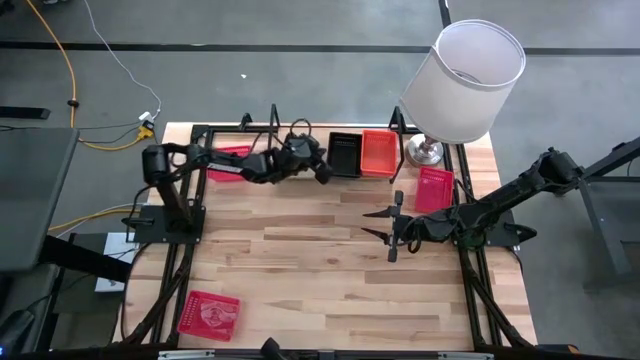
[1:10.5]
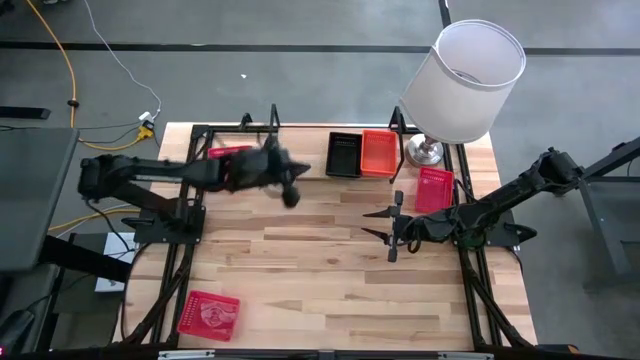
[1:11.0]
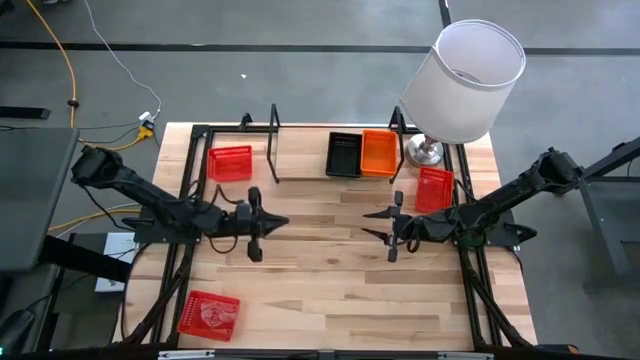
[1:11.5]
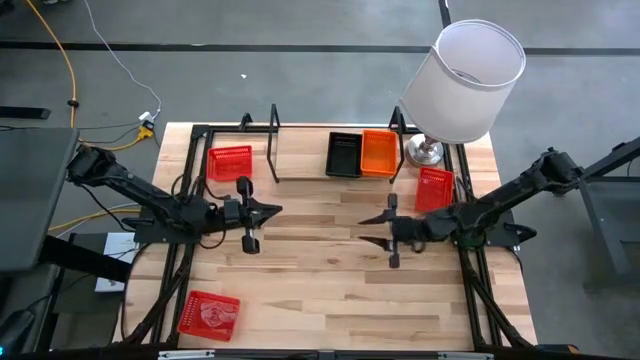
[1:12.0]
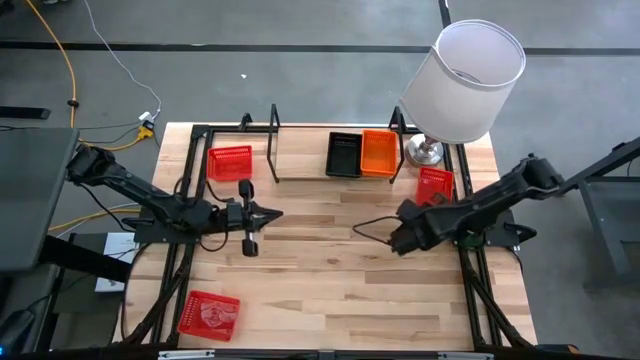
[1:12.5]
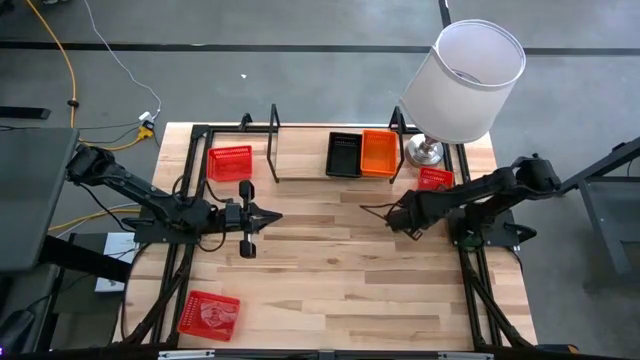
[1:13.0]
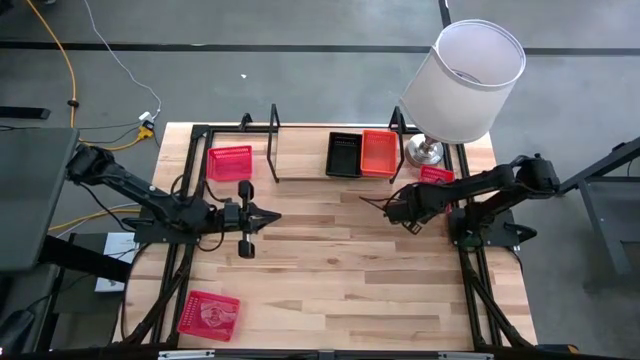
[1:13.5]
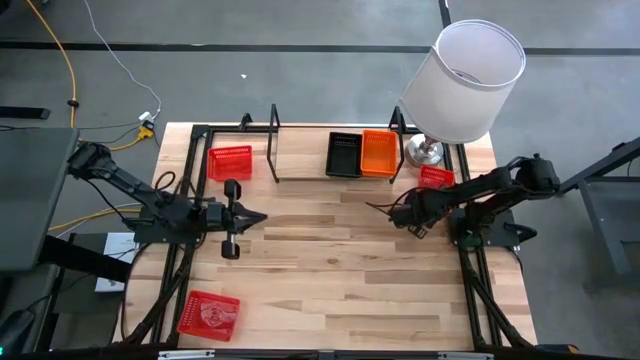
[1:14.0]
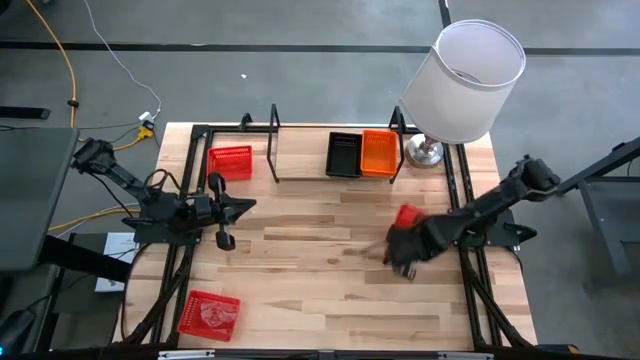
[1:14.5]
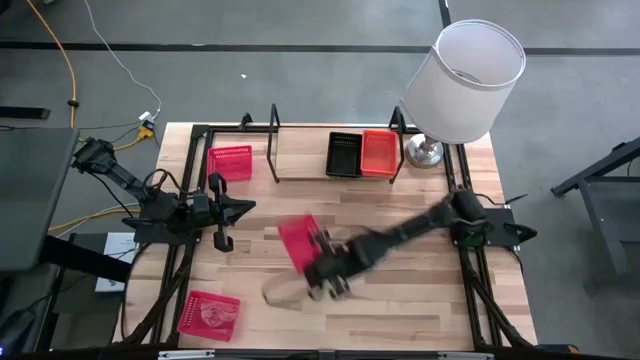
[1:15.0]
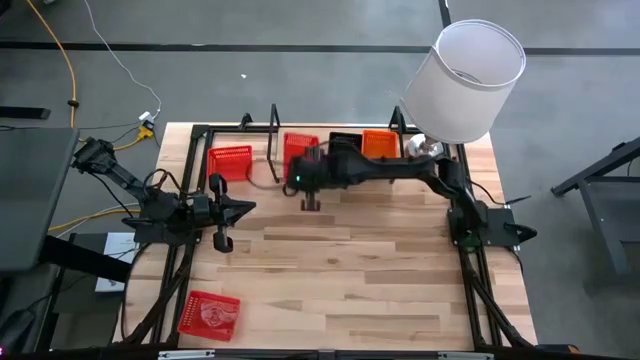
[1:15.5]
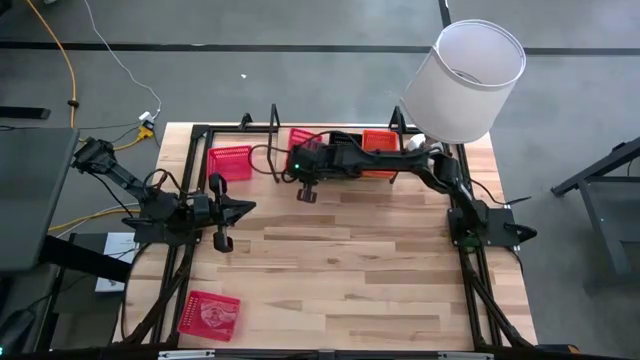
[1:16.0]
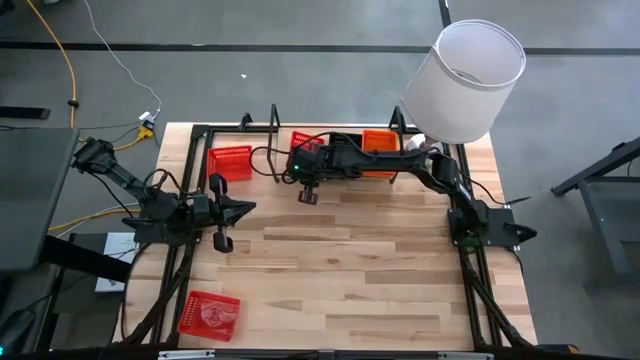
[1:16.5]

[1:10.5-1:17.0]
Task: Stack baskets on shelf by color
Put the middle red basket on the shelf

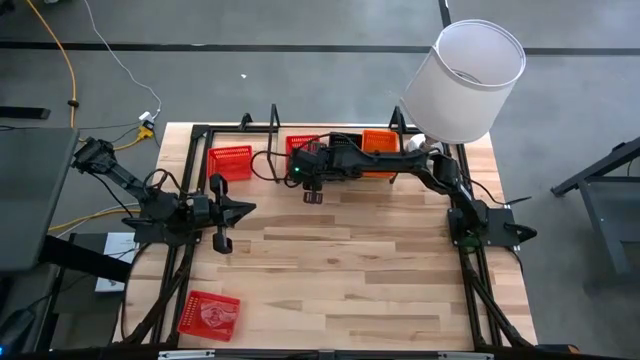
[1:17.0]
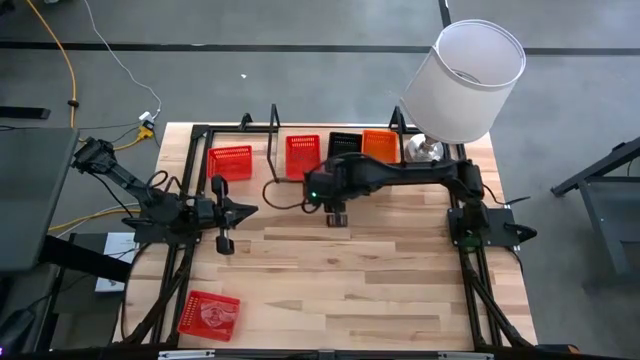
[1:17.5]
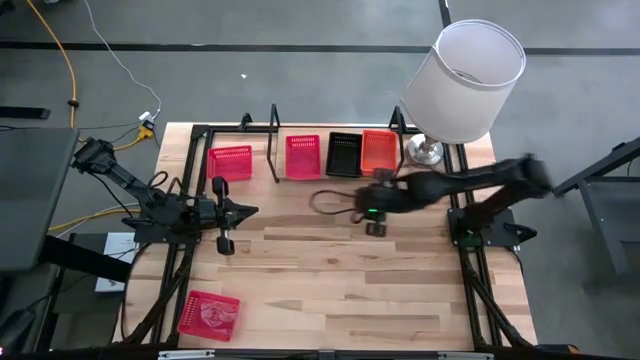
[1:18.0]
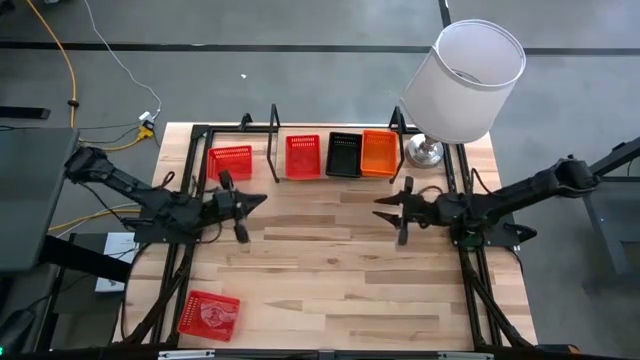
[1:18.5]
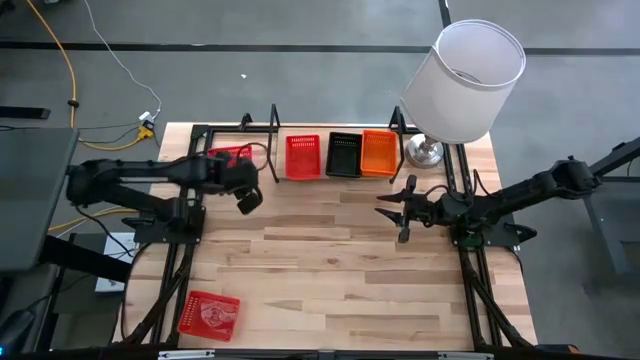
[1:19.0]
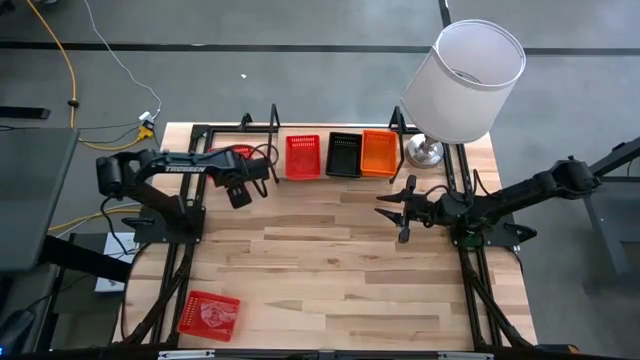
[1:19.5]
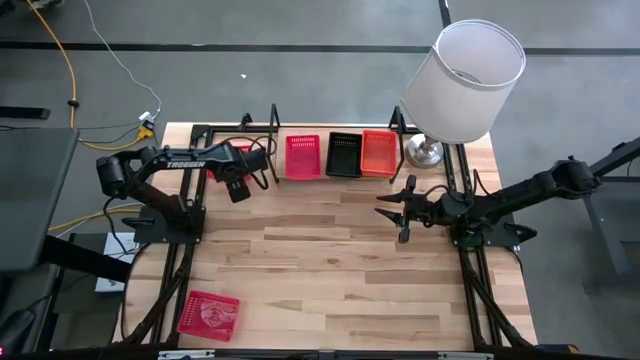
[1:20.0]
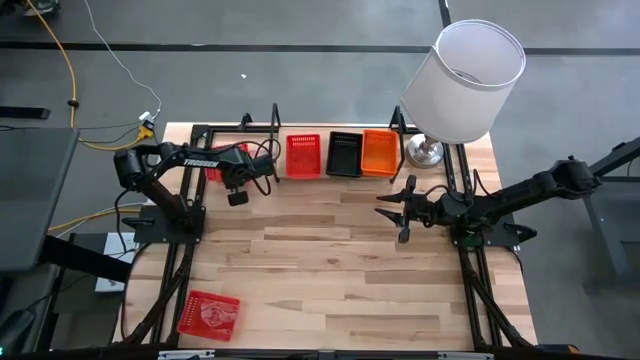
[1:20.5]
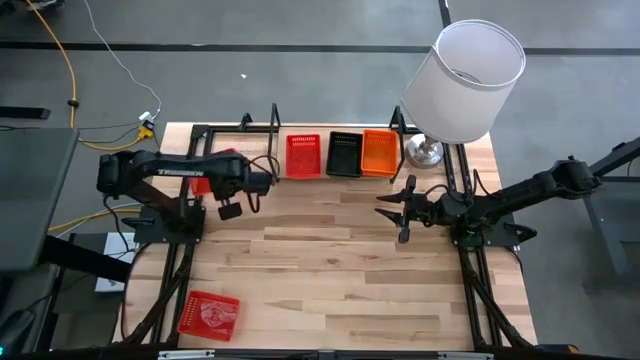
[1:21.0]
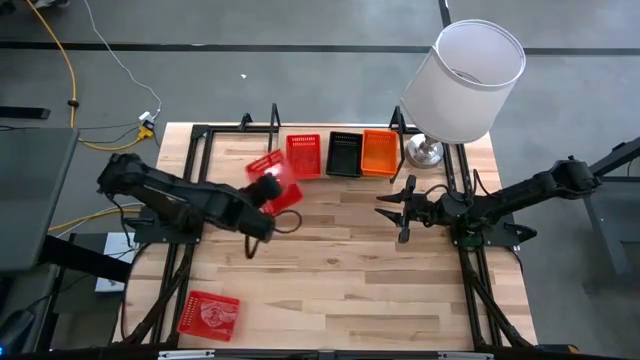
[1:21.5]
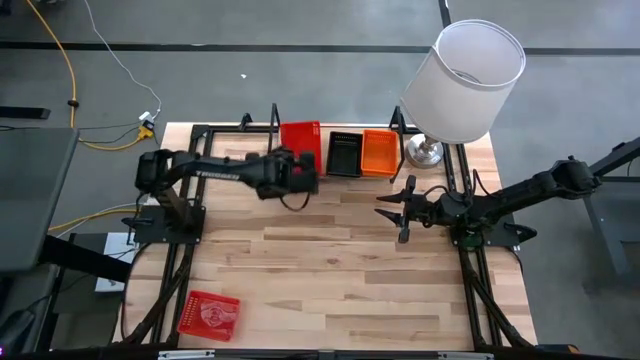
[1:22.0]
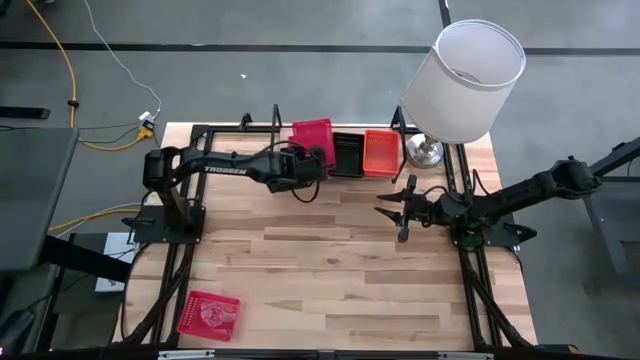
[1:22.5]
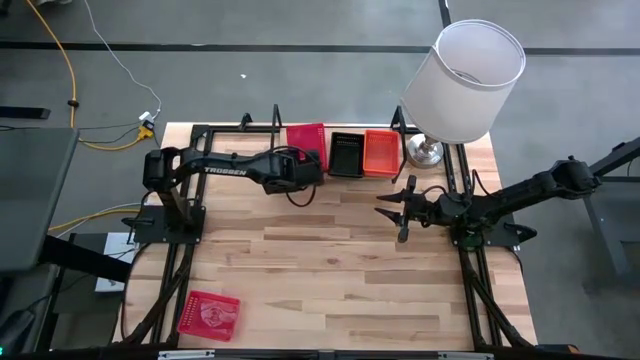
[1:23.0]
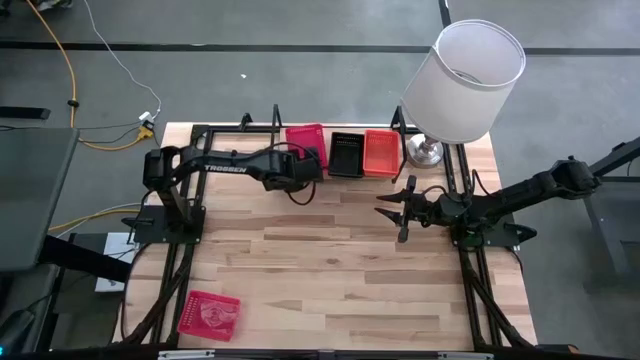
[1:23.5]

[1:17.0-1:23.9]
Stack the top red basket on top of the red basket on the shelf

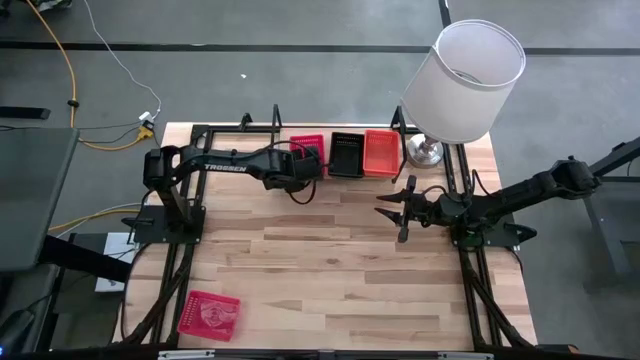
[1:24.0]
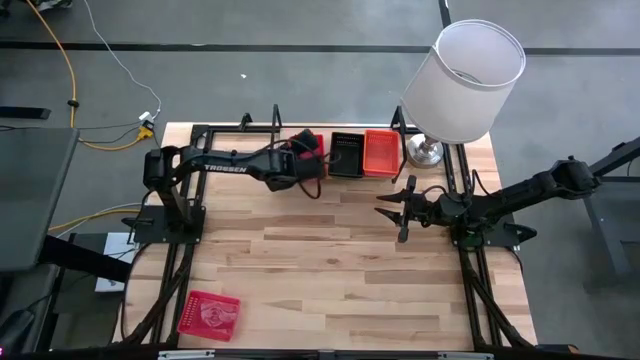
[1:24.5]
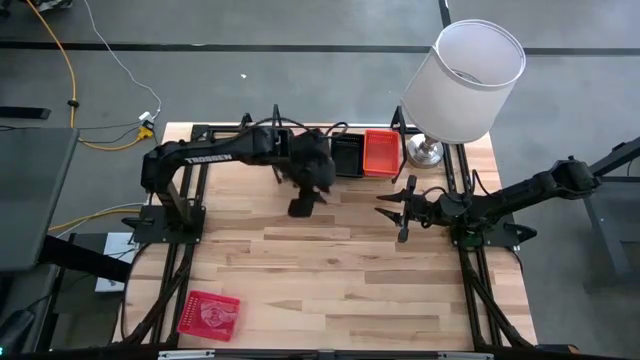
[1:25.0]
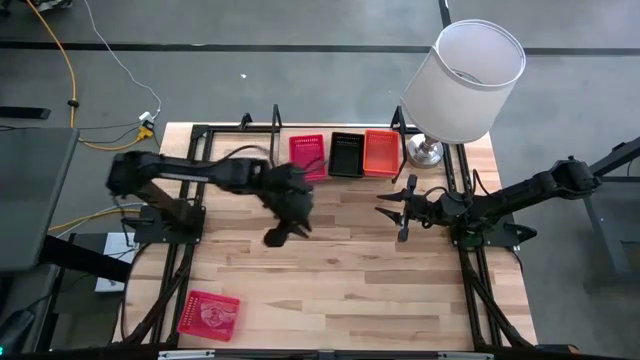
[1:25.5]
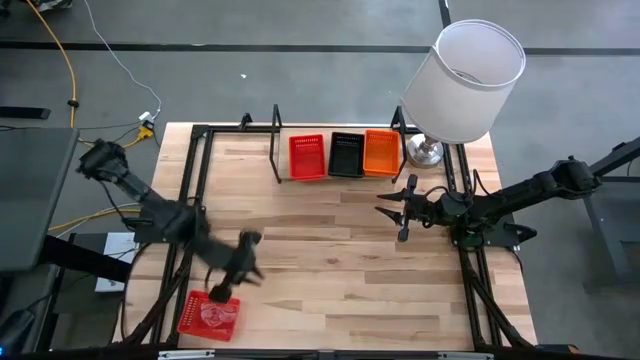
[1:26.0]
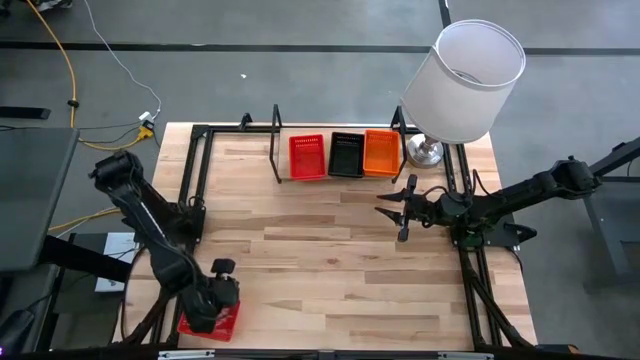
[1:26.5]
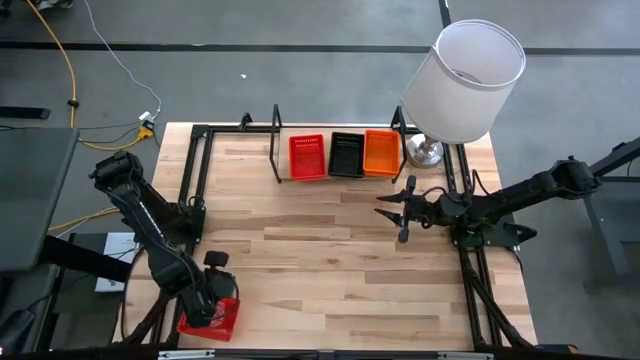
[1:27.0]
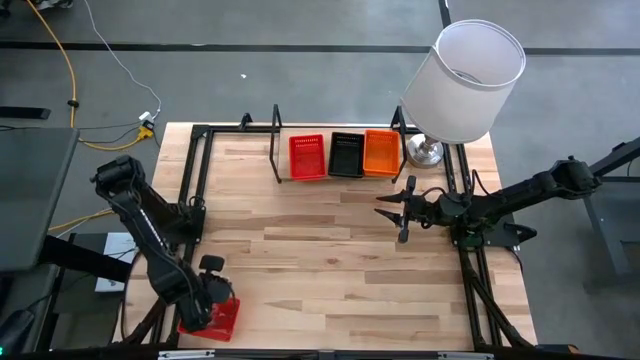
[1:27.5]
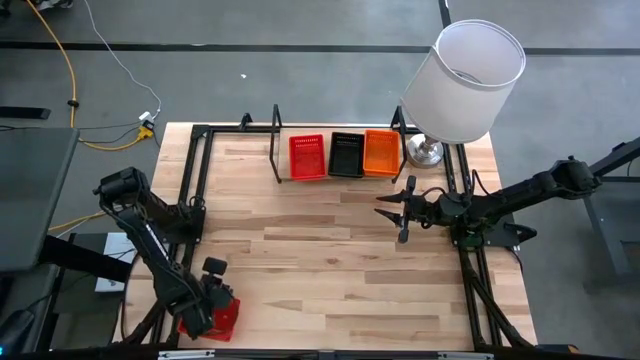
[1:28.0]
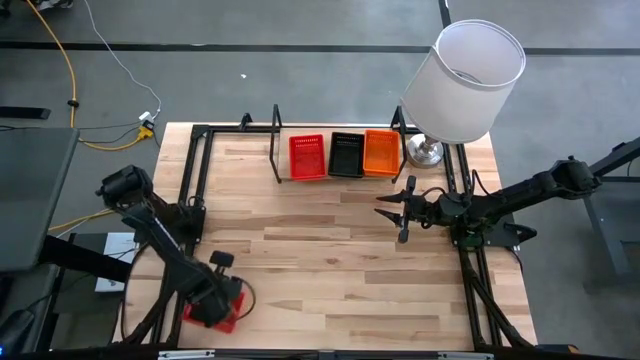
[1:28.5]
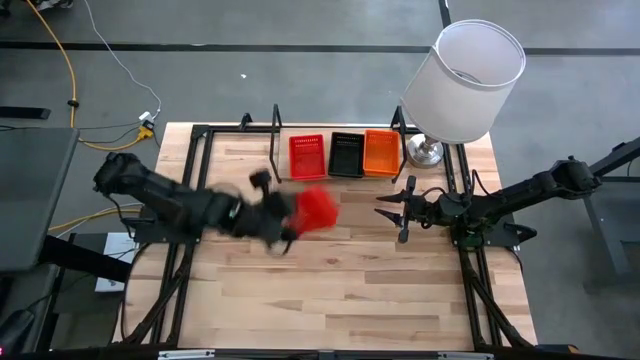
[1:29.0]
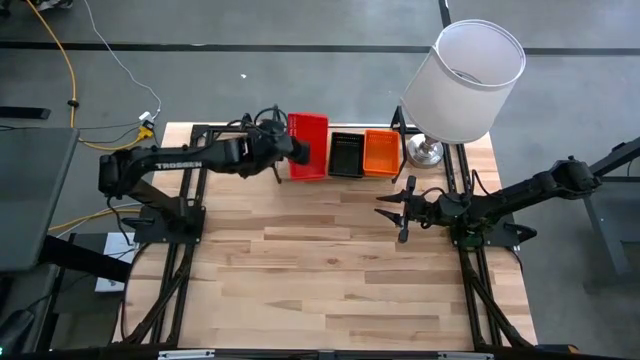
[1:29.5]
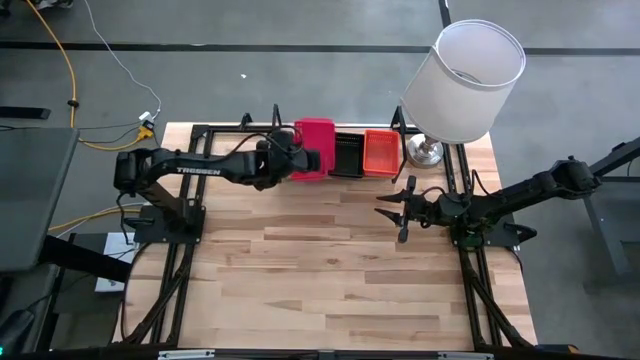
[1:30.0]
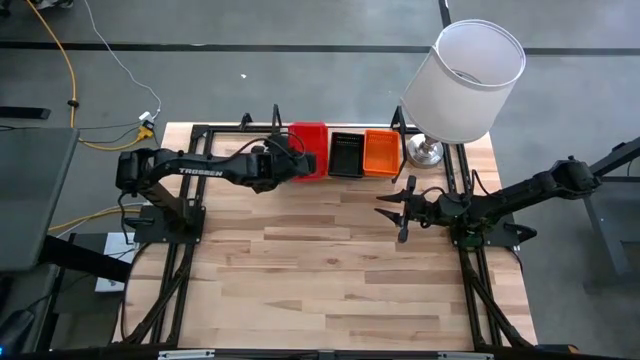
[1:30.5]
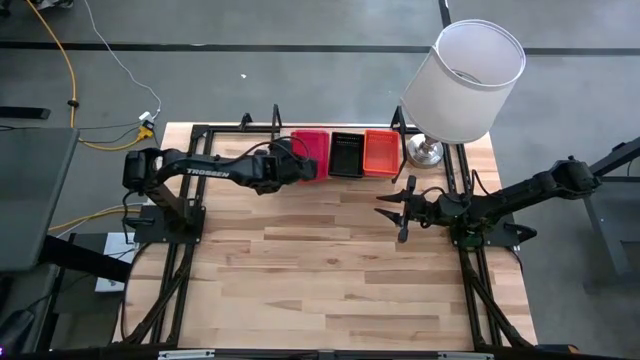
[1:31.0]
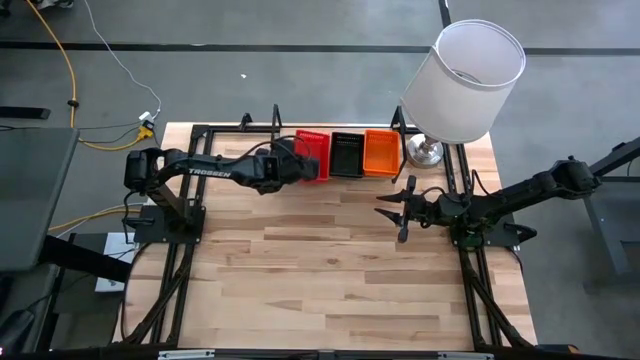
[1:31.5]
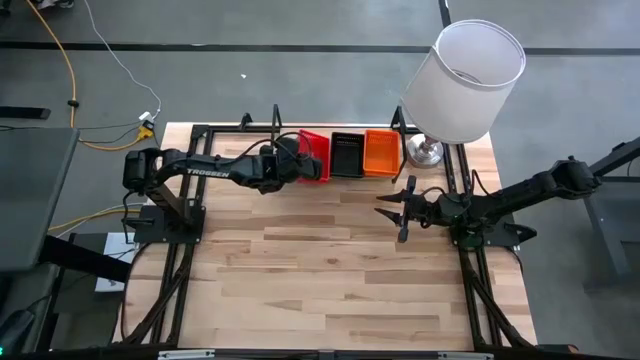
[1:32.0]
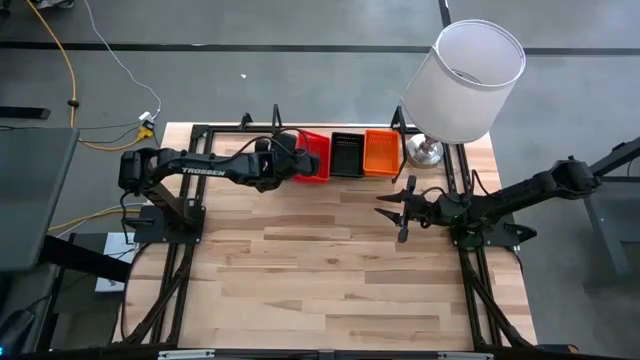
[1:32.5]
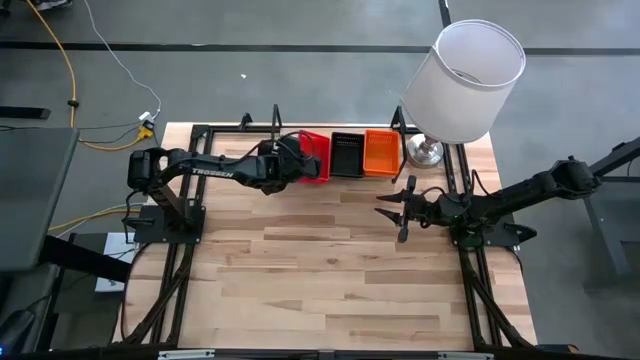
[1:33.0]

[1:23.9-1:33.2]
Stack the red basket on top of the red baskets on the shelf
